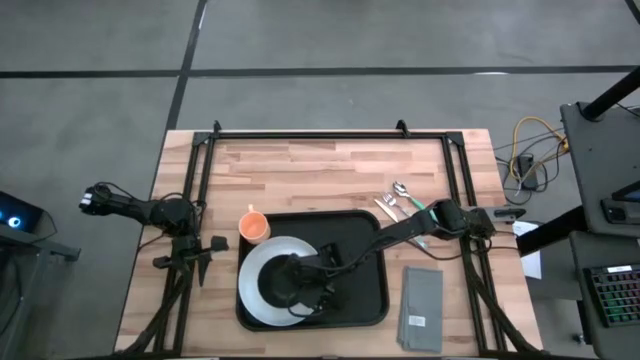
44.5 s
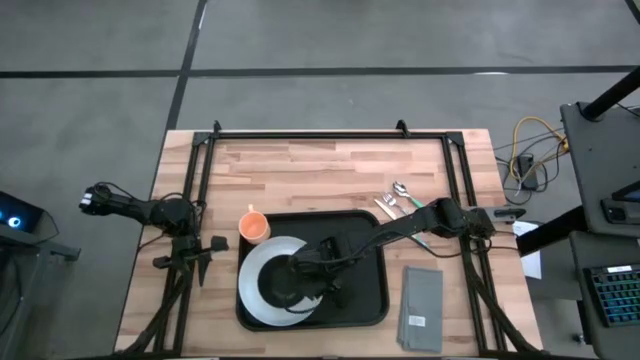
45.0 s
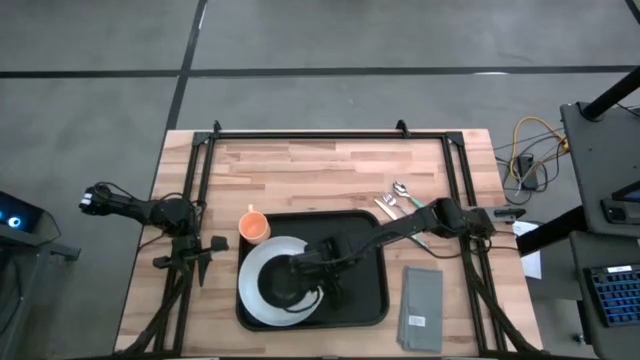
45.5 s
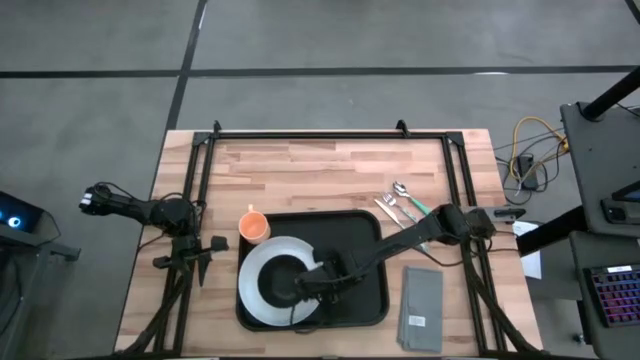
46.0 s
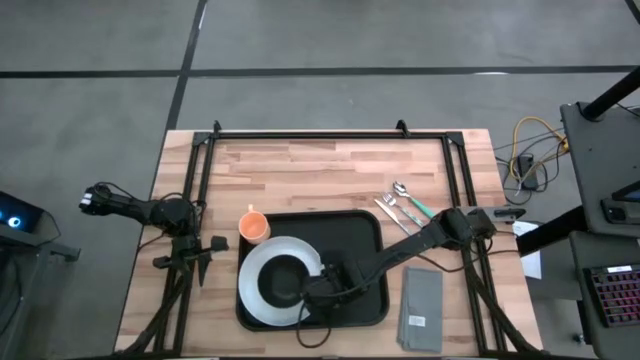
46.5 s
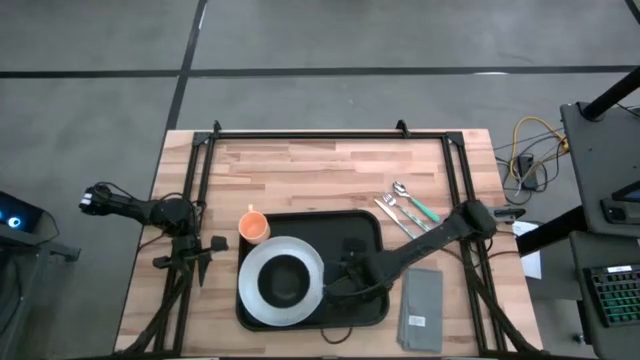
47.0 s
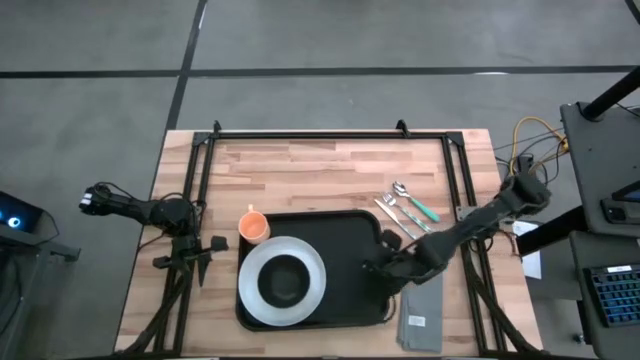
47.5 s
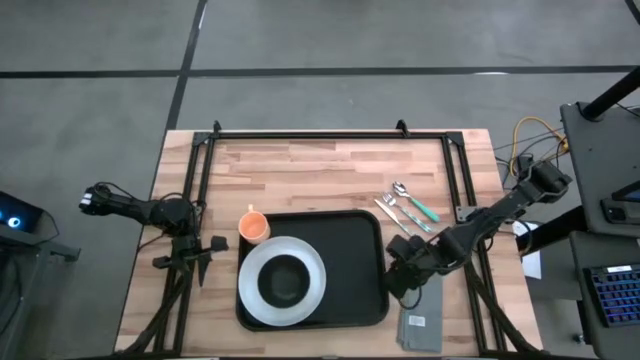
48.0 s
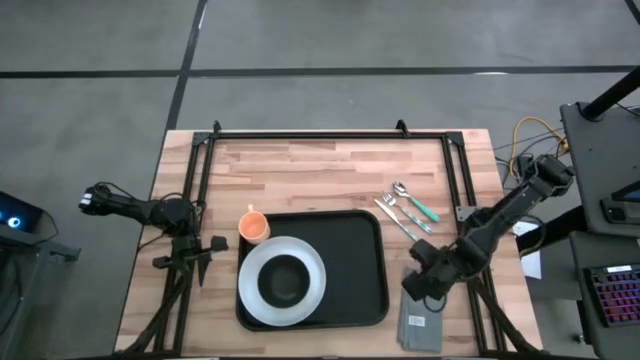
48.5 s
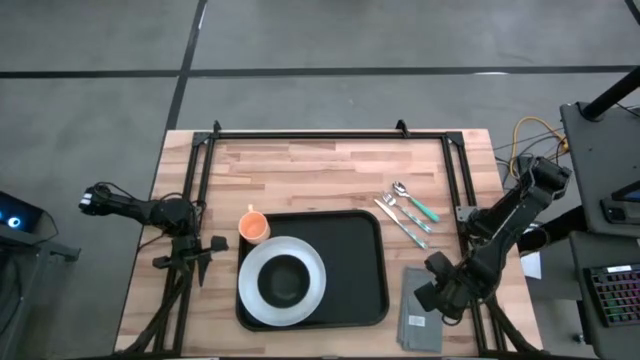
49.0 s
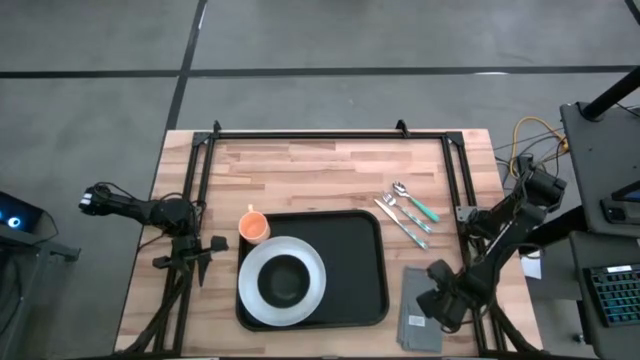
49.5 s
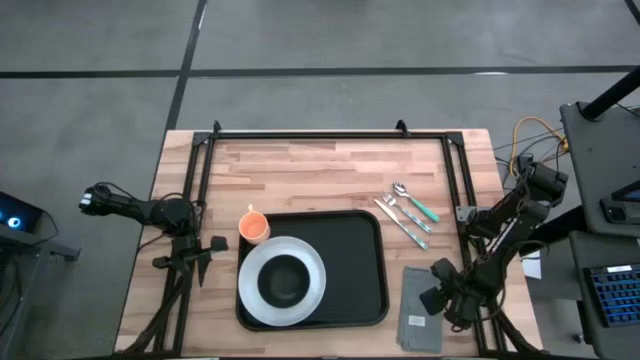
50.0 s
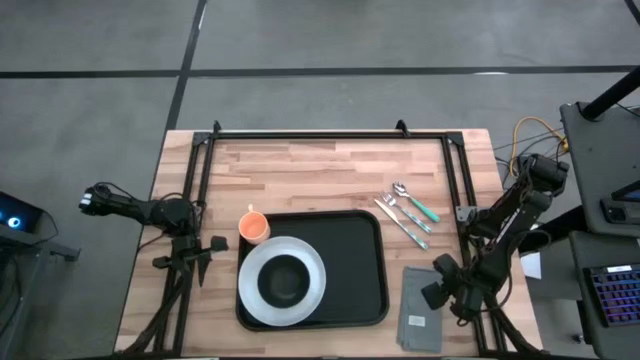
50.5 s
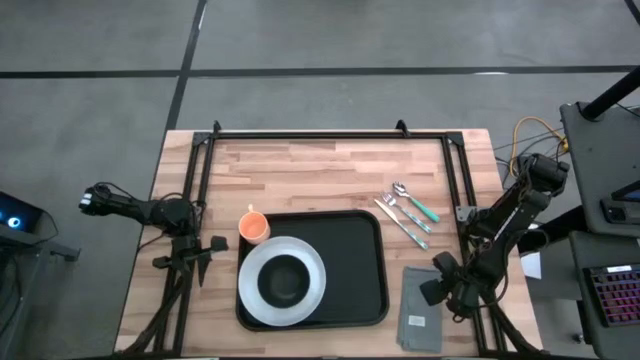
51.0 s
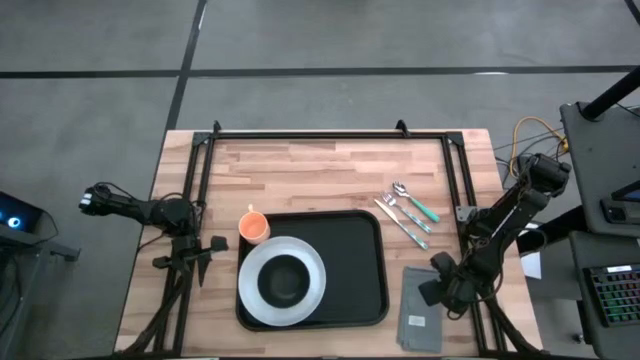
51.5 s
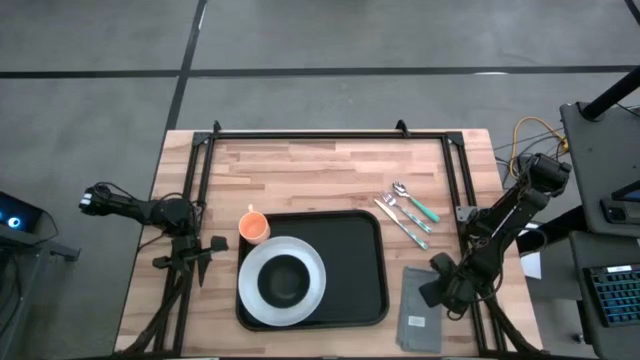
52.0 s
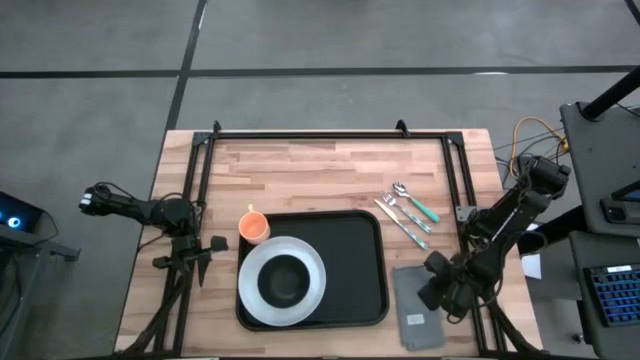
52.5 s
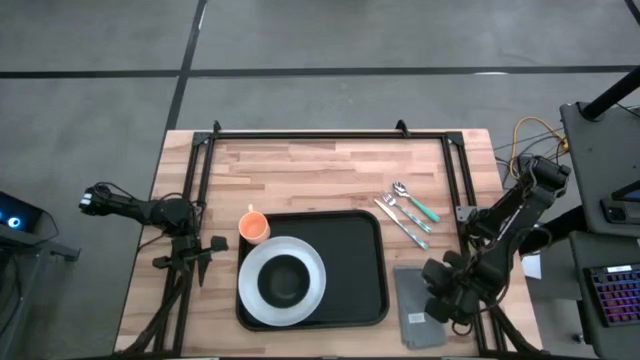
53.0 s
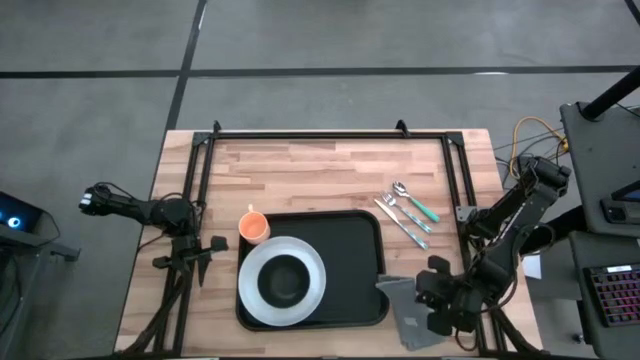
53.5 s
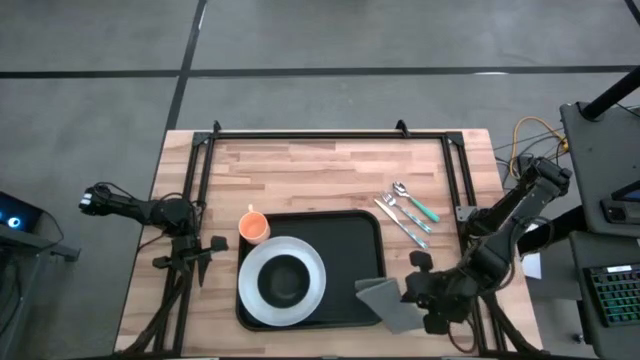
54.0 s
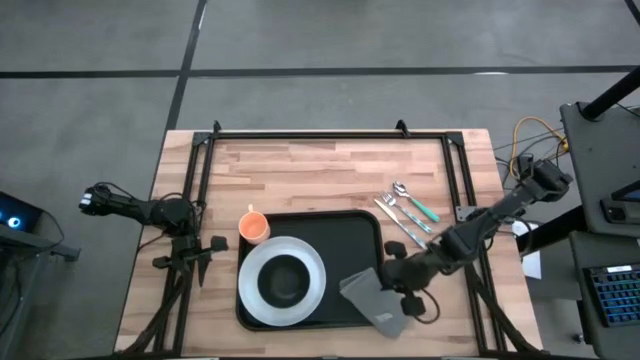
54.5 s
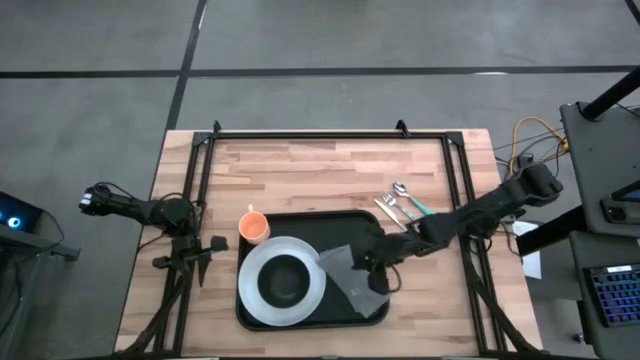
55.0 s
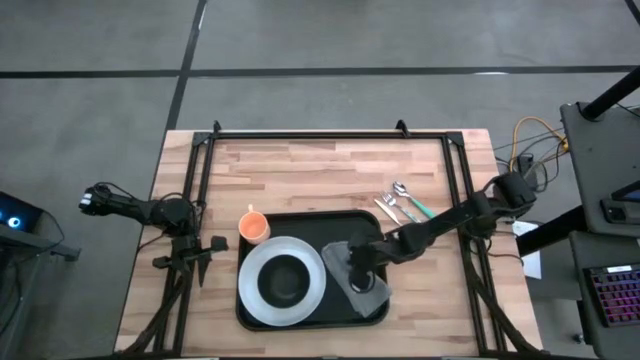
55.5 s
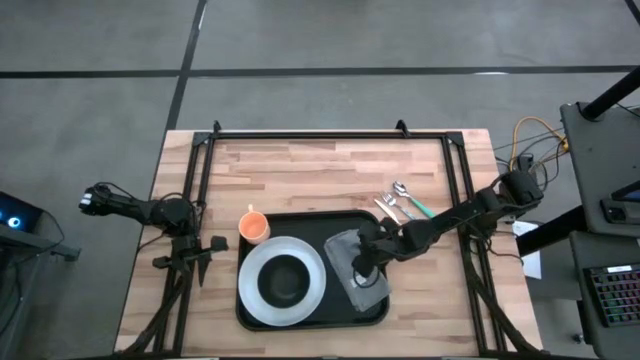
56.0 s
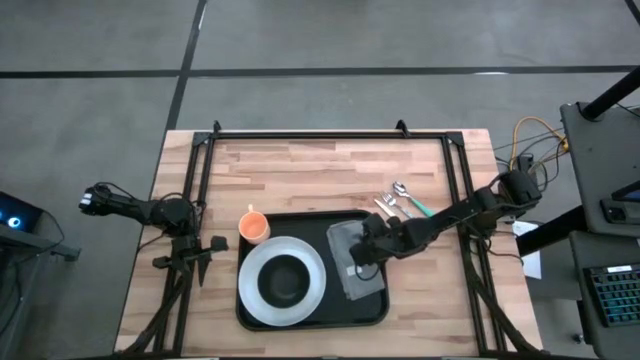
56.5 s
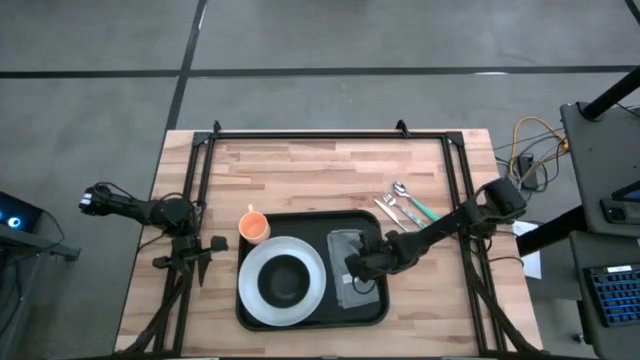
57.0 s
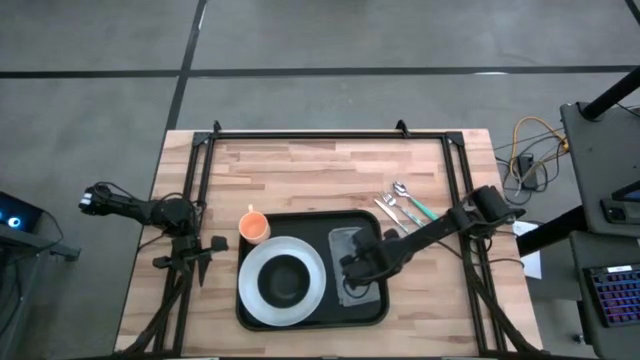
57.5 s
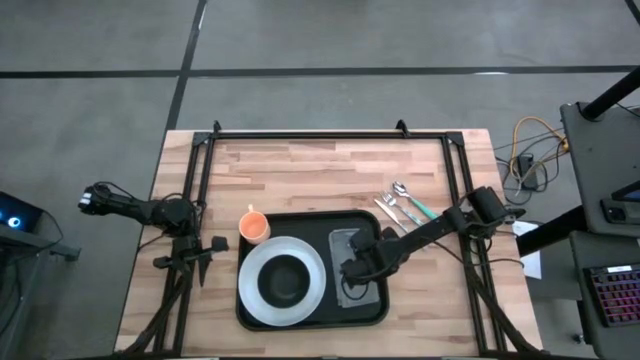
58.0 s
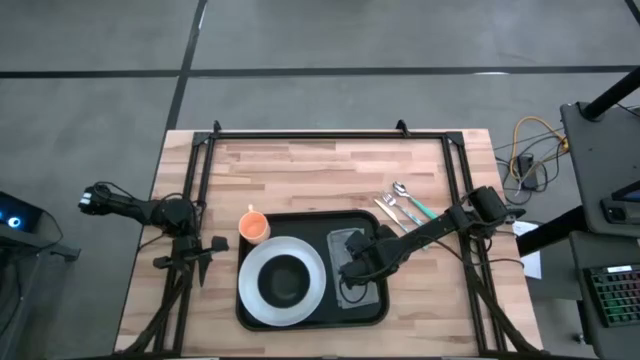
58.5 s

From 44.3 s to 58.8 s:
Task: Set up tray
Put the gray table napkin to the right of the white plate on the black table tray

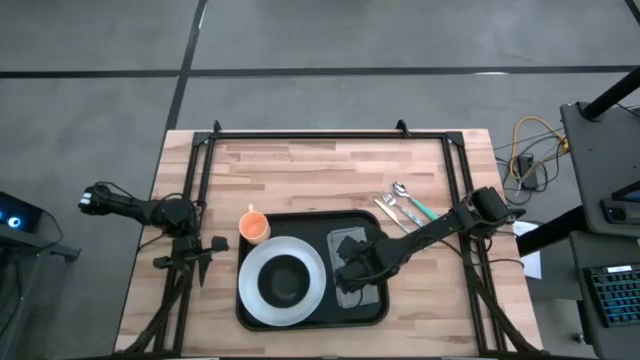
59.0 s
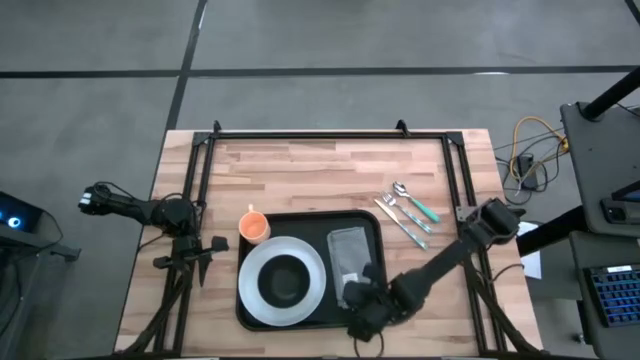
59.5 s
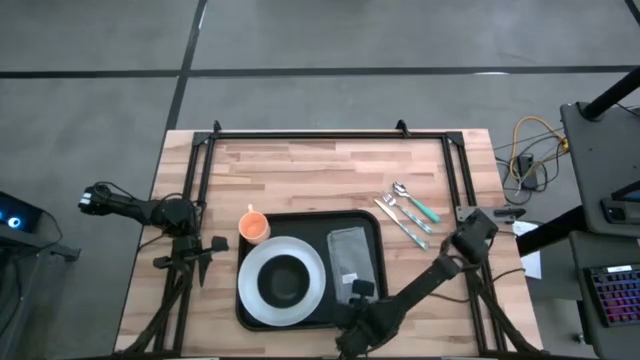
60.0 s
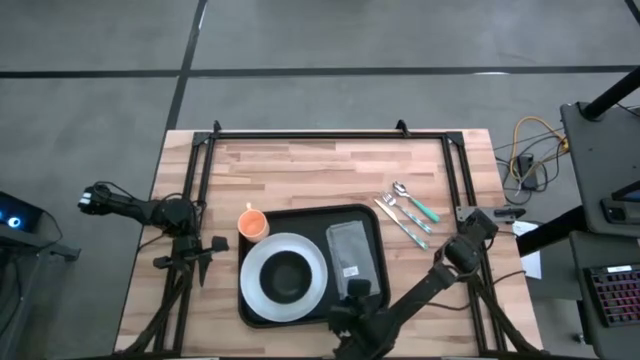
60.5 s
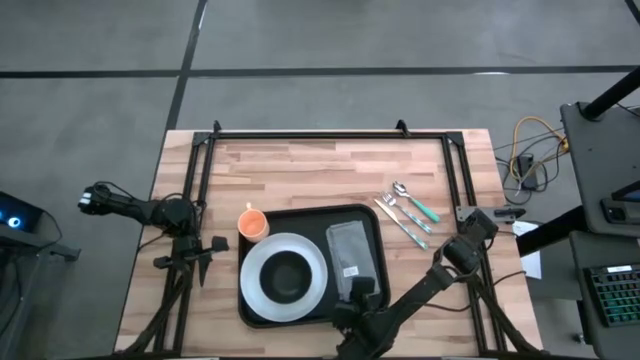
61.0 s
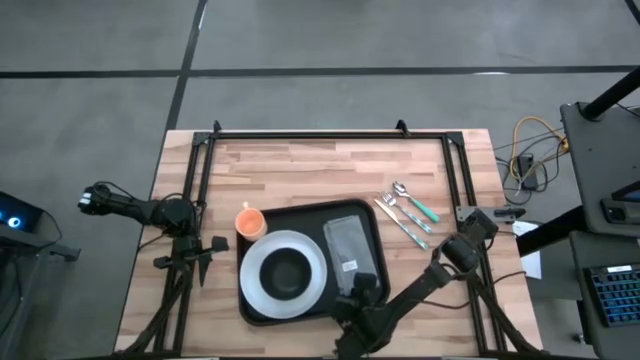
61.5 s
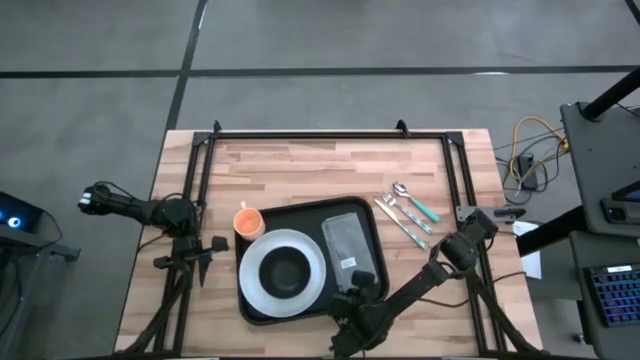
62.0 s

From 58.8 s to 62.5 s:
Adjust the table gray napkin on the black table tray

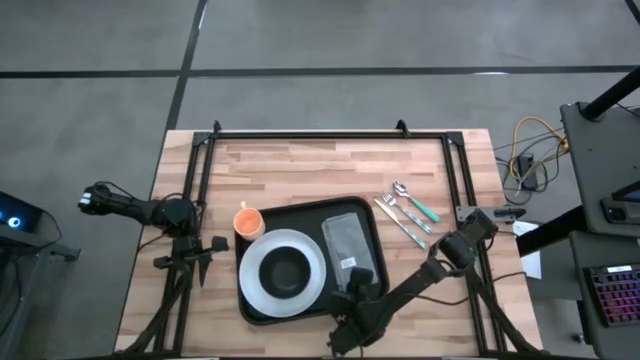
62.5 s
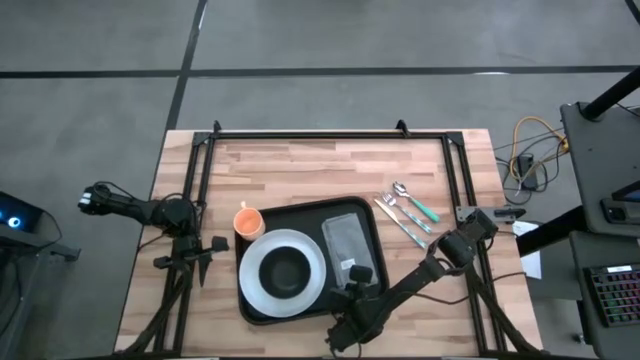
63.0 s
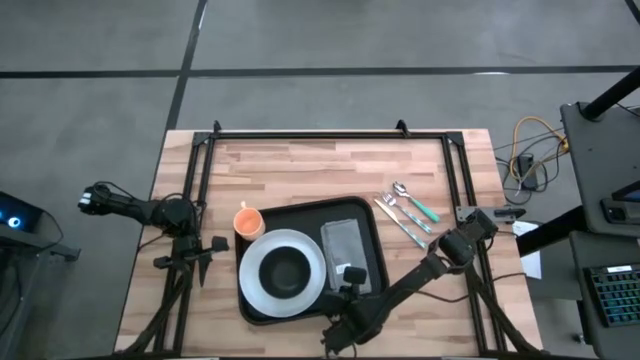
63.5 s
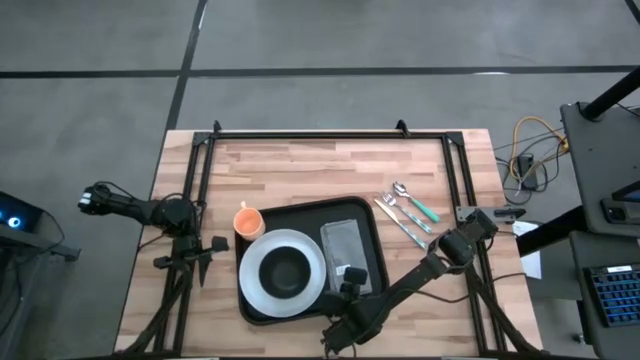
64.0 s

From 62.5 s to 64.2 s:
Adjust the table gray napkin on the black table tray

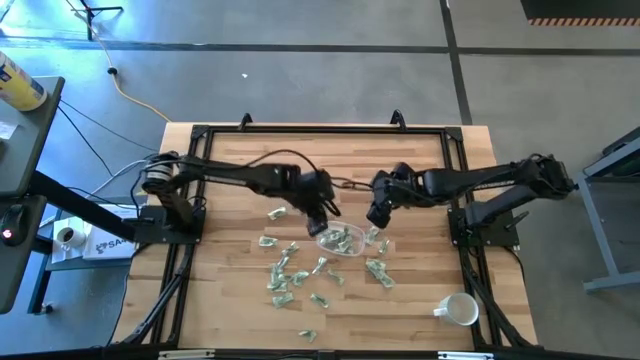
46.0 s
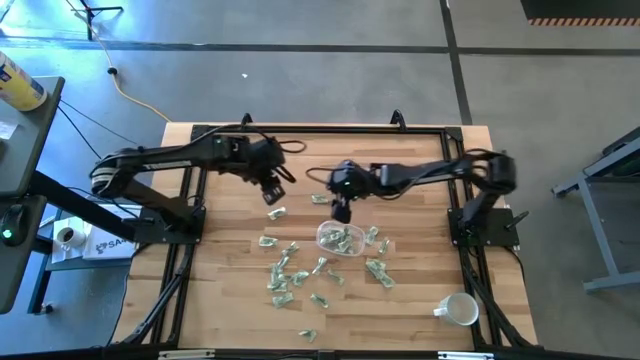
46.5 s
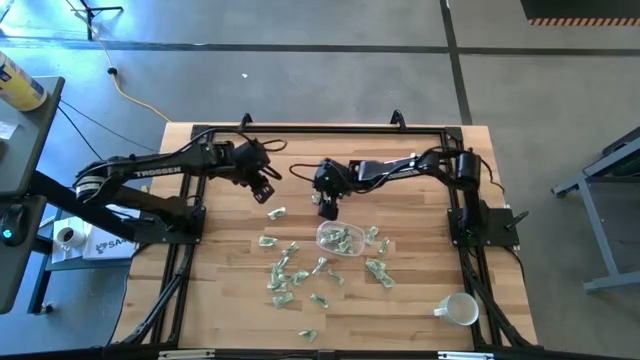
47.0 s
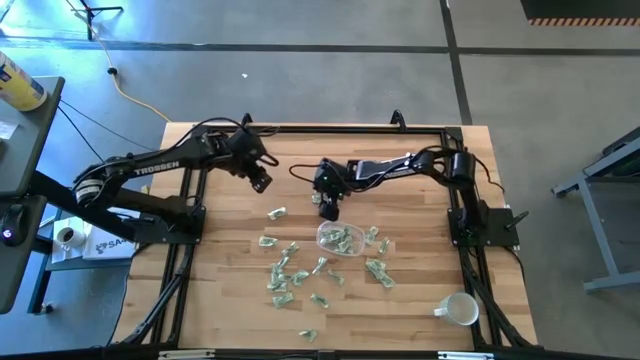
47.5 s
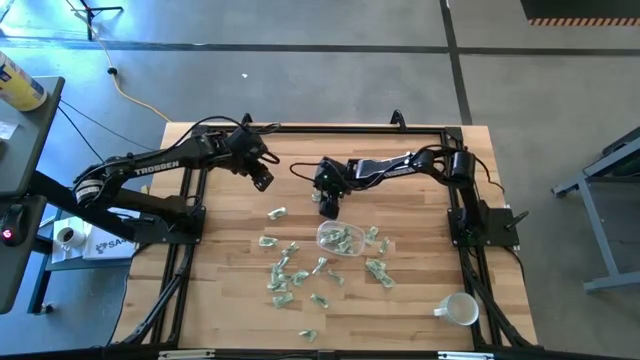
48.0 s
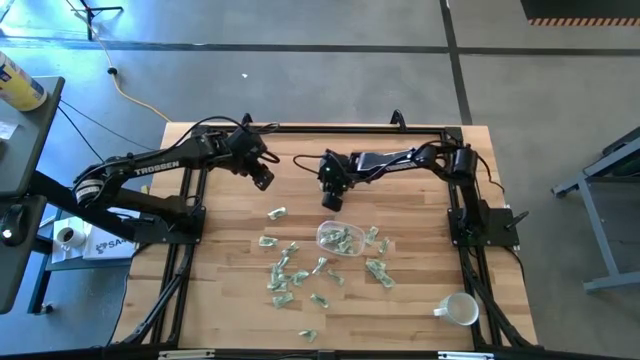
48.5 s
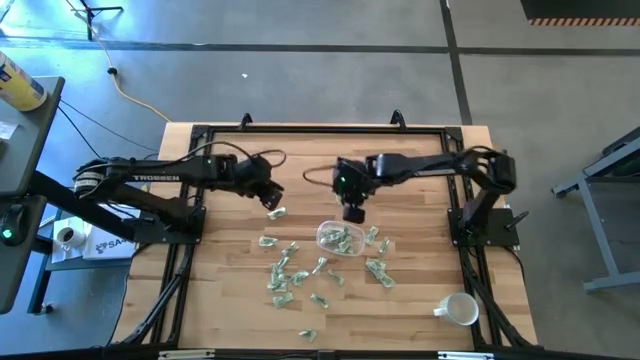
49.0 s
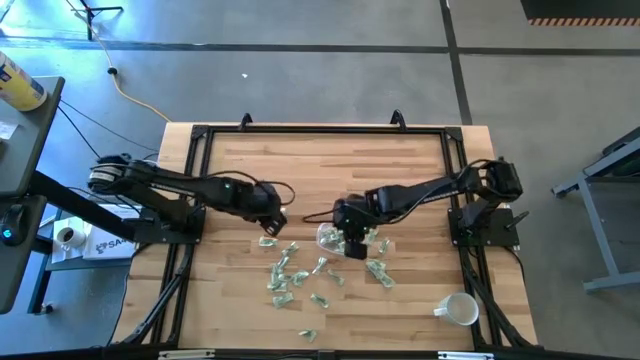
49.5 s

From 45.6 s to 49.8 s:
Task: Pick and place Stevia / Truvia into bins
Put the green stevia packet into the transparent container
